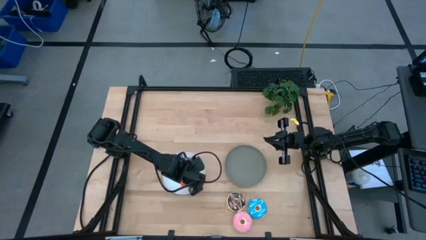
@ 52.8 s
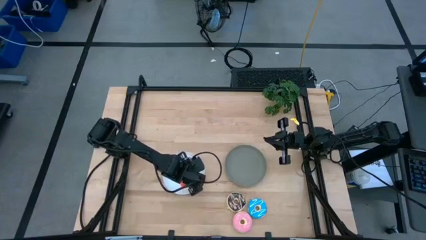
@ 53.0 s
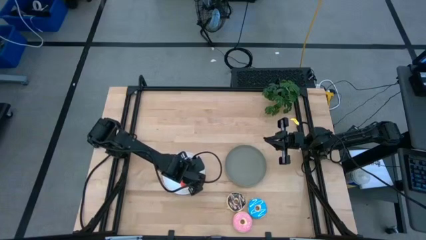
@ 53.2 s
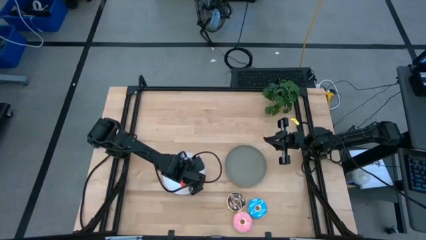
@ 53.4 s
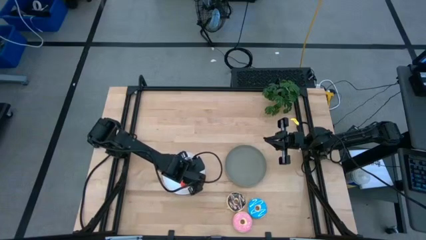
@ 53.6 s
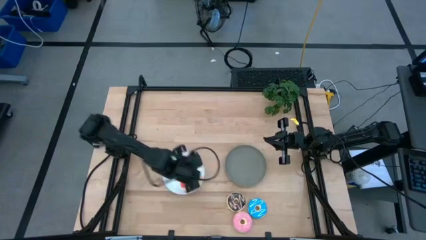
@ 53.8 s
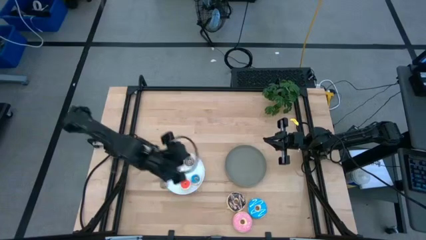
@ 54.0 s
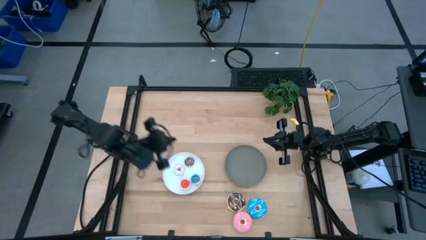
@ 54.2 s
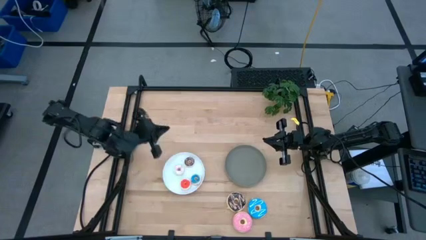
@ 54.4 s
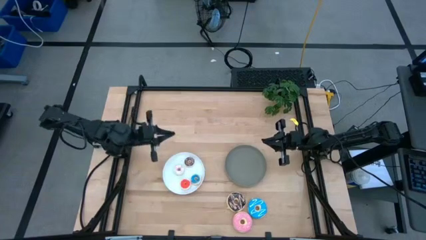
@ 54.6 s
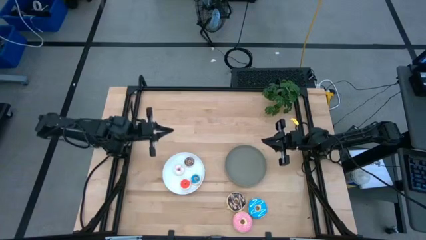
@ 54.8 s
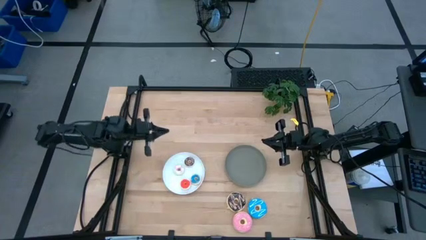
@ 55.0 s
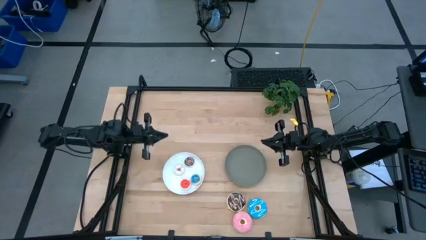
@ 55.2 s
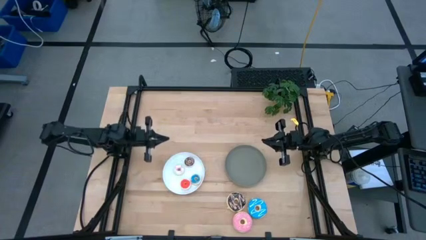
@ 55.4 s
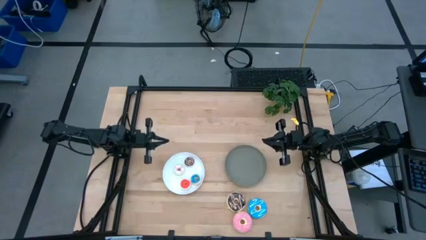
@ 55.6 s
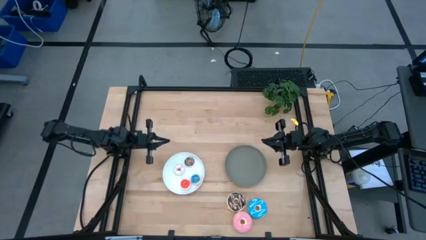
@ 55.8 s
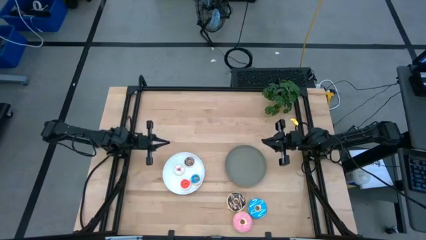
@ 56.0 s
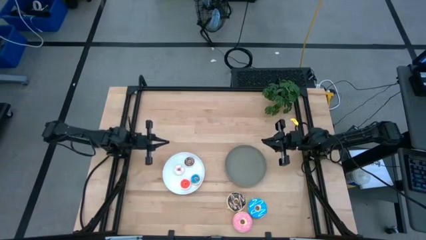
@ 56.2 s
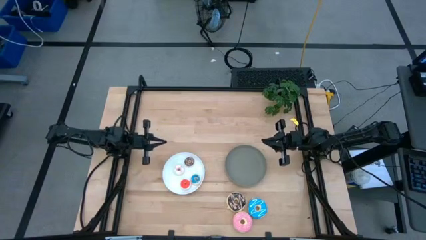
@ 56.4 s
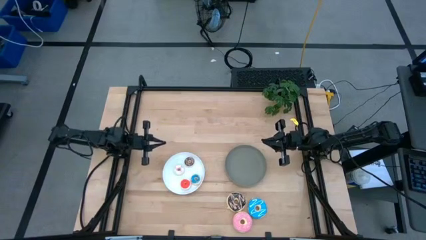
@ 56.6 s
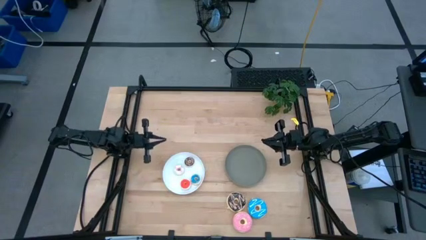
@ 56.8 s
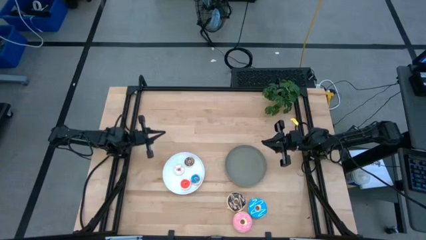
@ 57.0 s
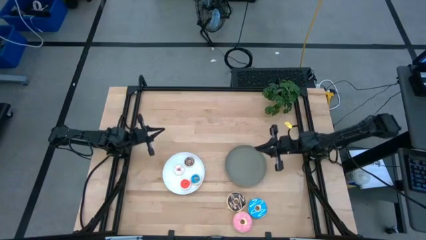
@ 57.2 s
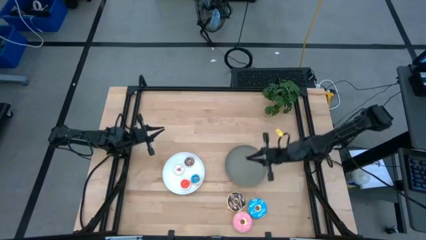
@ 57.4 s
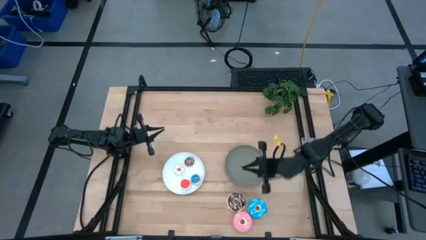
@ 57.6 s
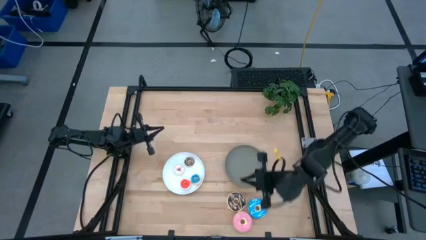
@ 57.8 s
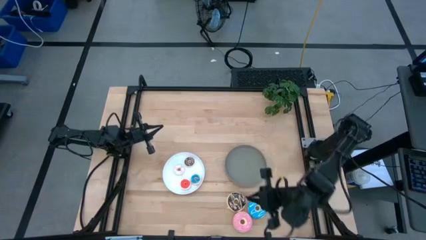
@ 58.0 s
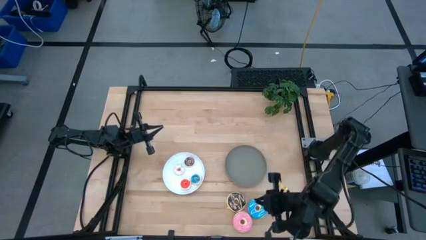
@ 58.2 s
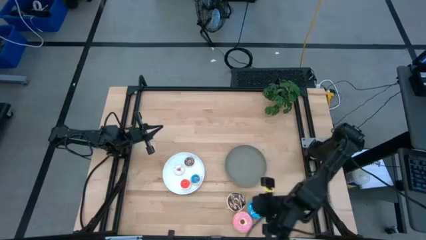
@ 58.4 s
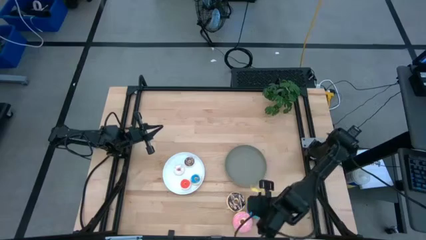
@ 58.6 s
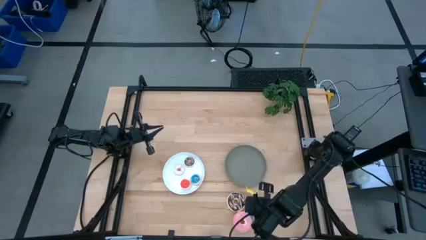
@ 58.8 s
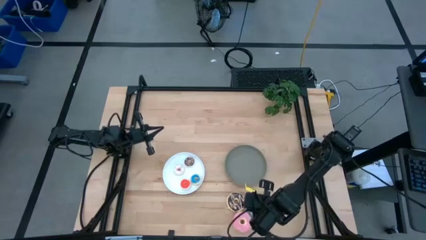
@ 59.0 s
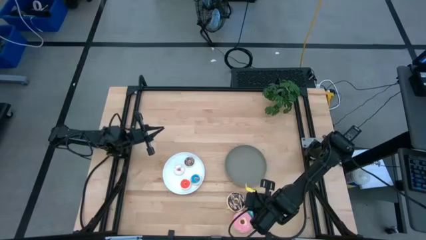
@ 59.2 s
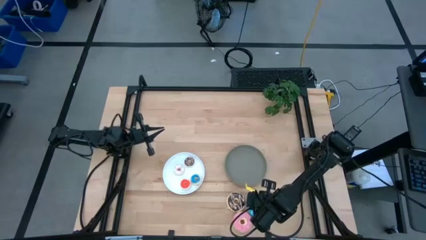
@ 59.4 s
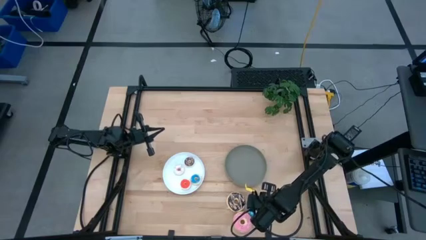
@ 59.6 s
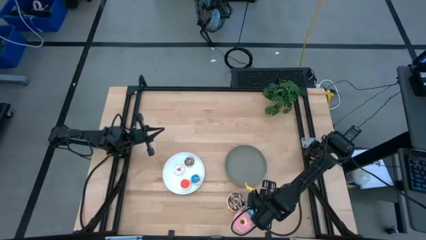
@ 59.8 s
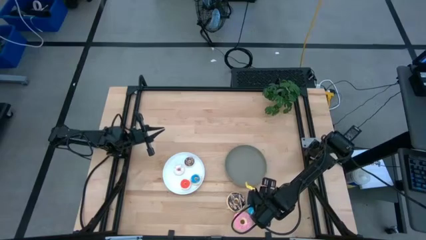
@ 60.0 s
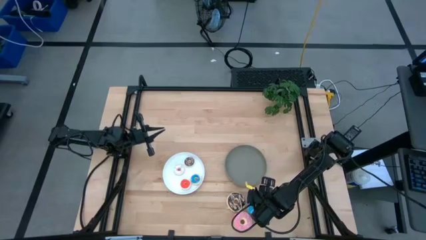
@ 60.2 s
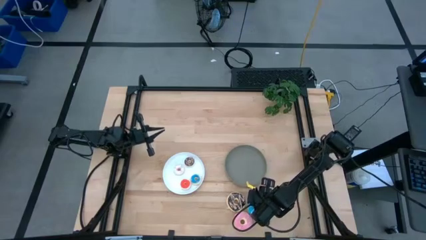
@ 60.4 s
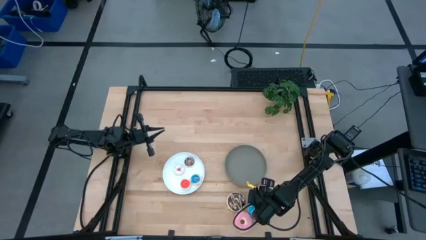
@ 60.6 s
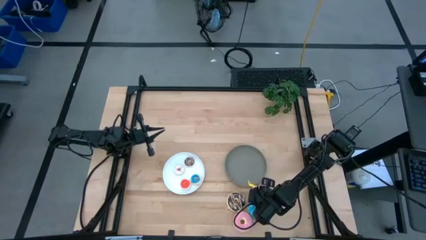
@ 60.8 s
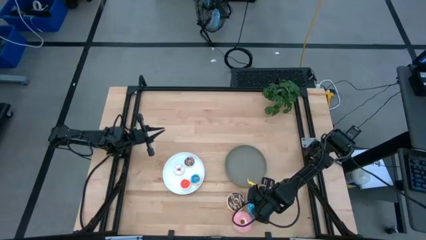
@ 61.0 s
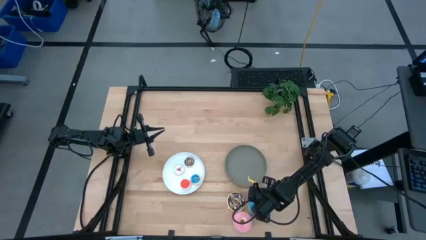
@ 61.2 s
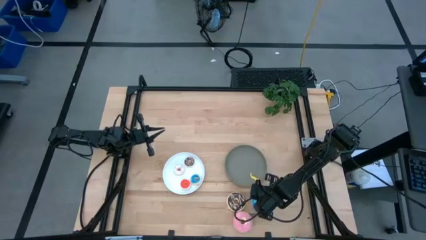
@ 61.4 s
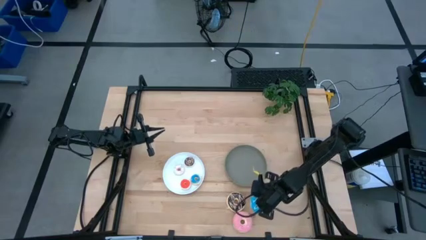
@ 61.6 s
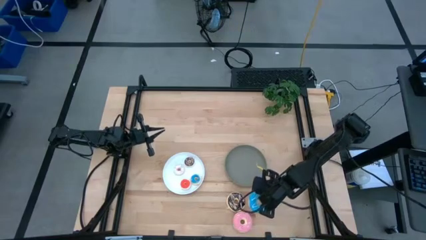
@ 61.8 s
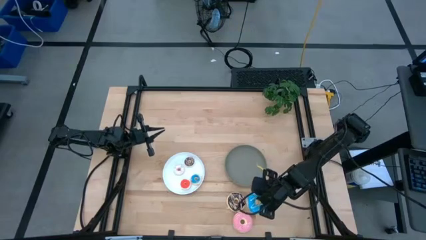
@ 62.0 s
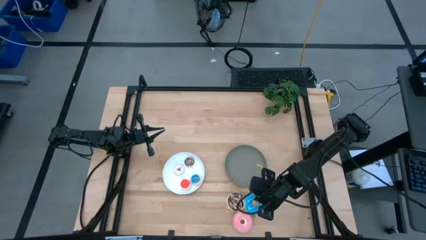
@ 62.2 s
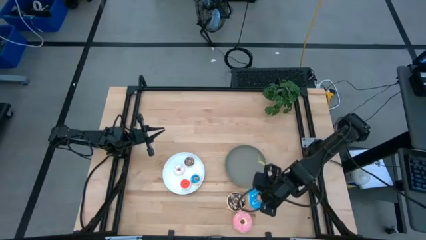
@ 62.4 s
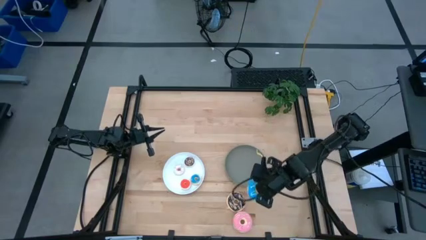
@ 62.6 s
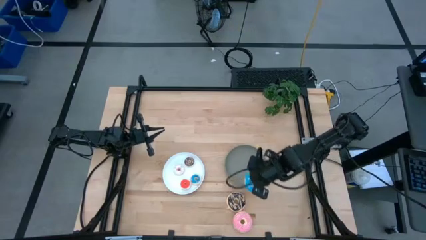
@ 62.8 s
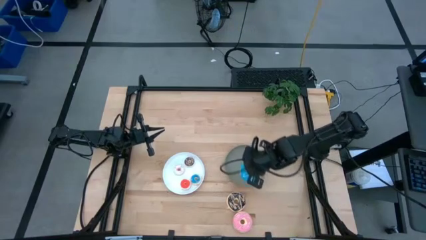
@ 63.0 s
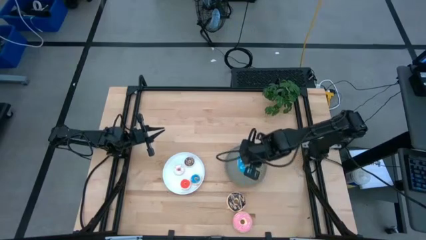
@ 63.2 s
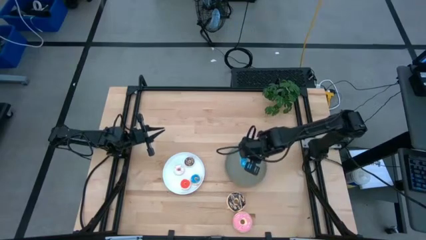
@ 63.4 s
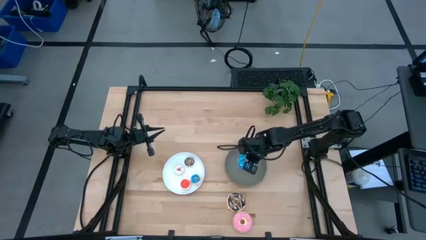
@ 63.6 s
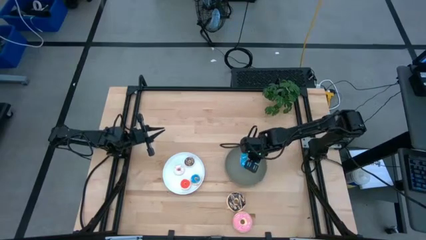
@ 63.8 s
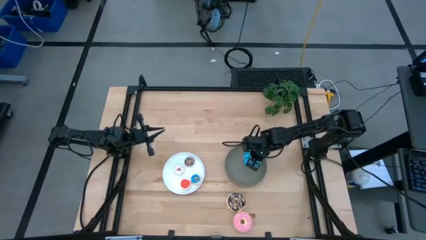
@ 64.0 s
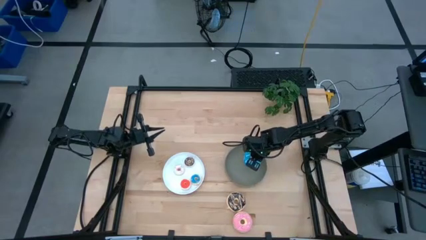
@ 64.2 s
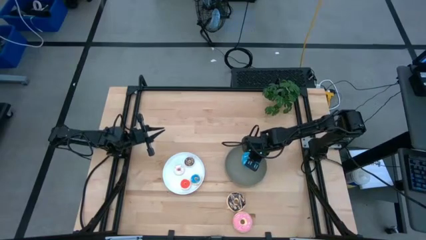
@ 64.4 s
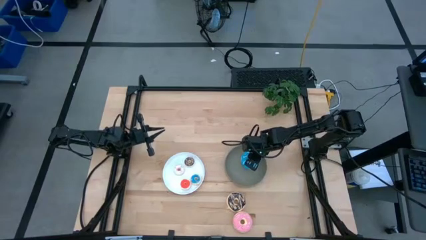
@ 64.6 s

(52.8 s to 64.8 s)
Task: Pick & Place donuts
Put the large blue donut on the gray plate
